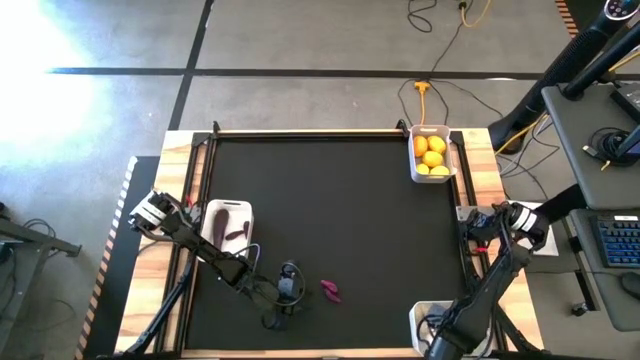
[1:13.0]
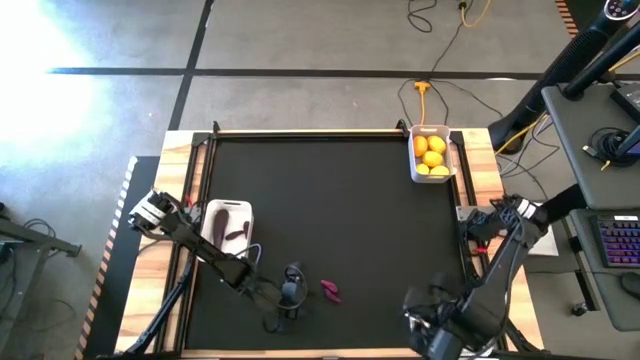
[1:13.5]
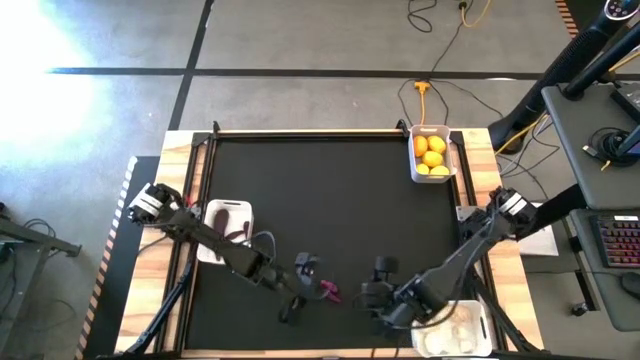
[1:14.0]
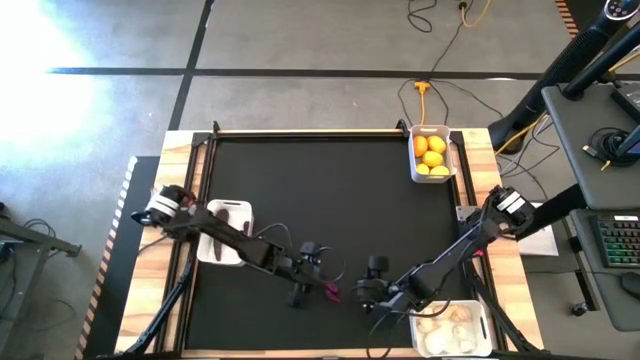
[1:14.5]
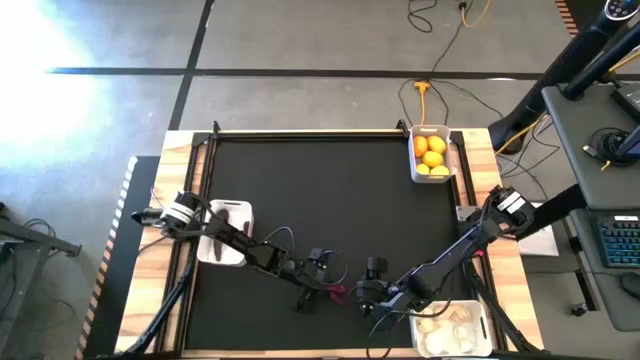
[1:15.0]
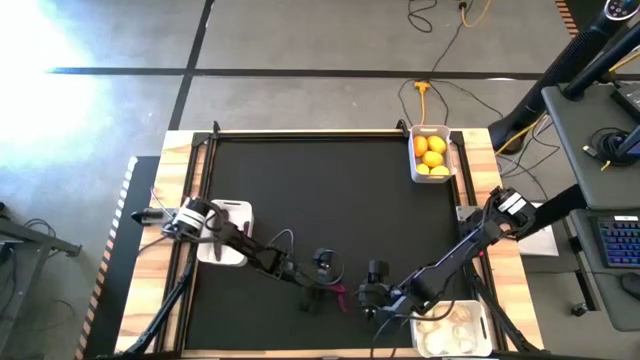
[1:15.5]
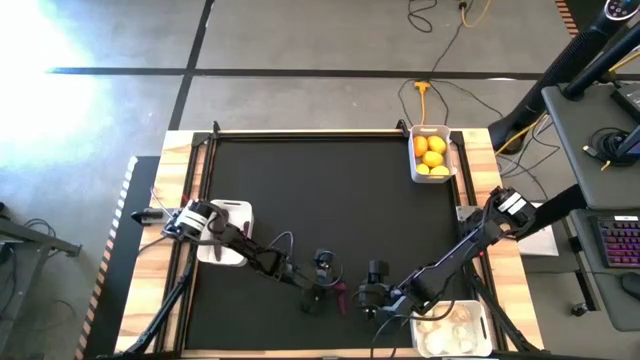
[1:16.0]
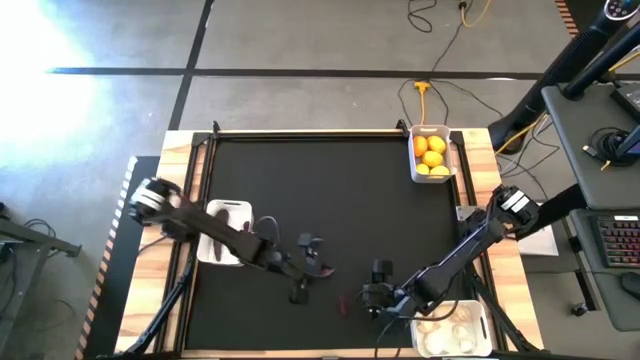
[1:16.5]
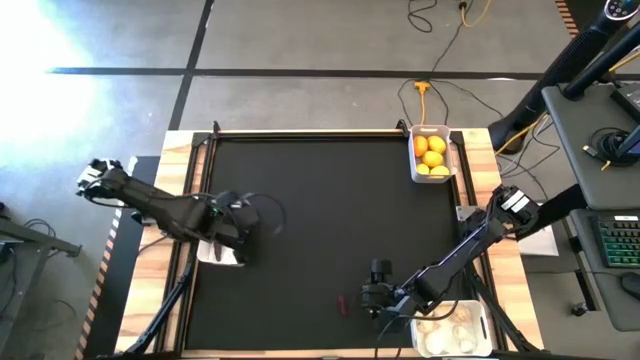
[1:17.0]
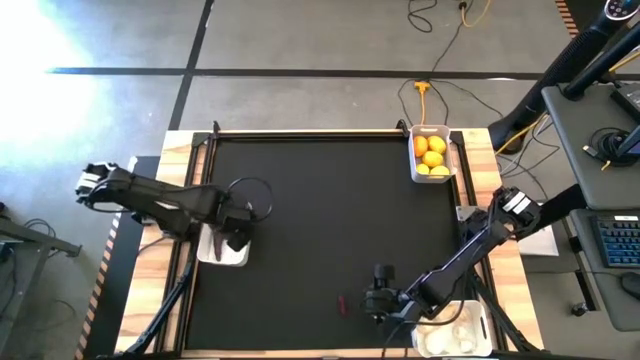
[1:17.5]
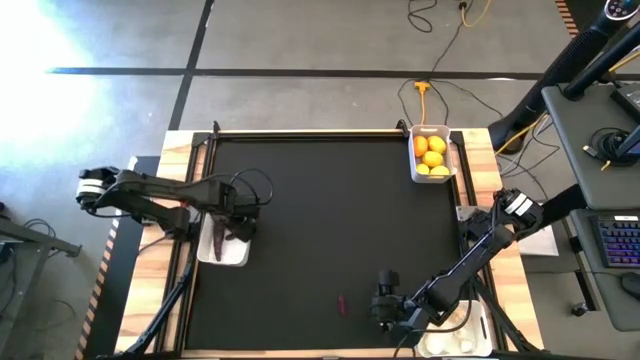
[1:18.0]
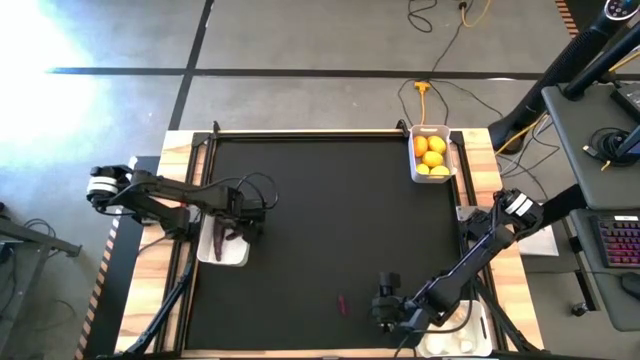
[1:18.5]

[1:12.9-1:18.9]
Task: Sort produce into baskets
Put the eggplant into the top white bin

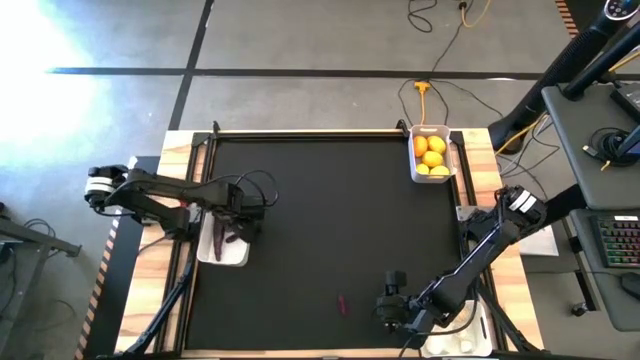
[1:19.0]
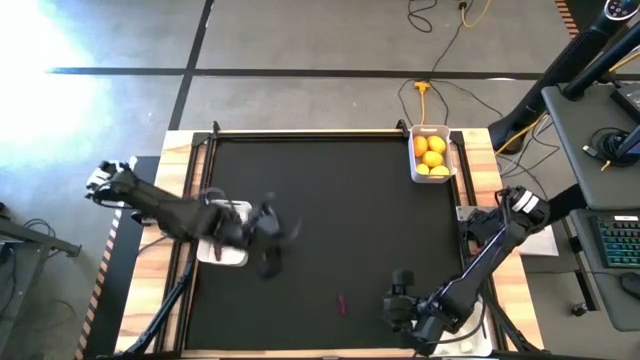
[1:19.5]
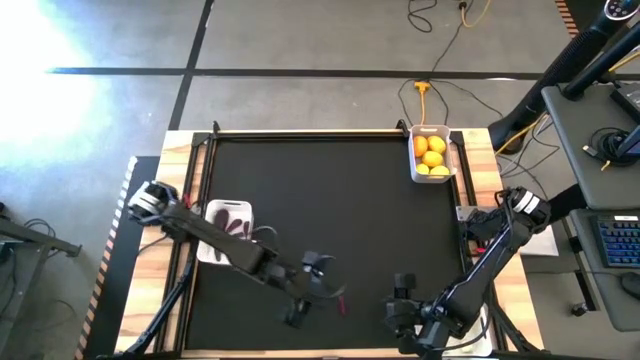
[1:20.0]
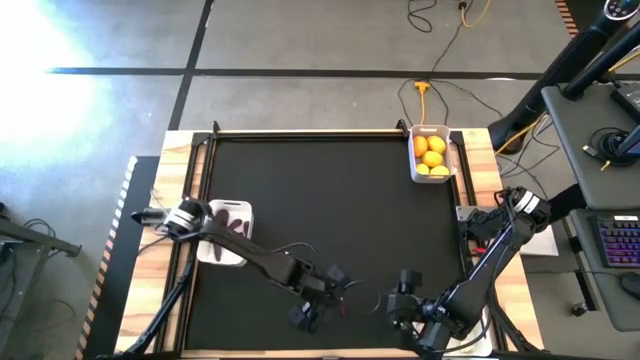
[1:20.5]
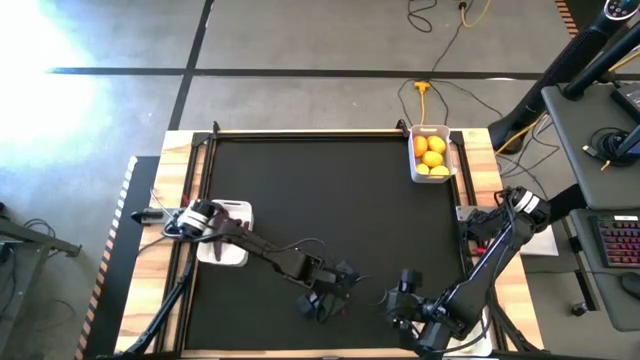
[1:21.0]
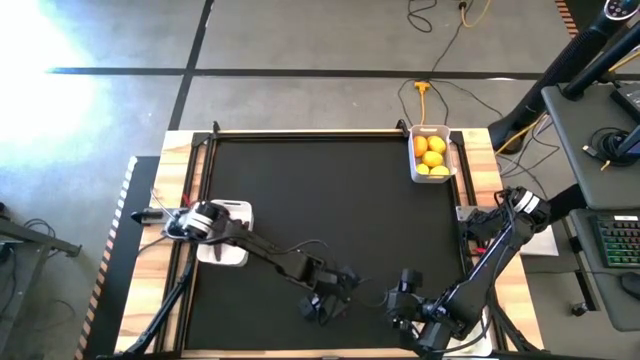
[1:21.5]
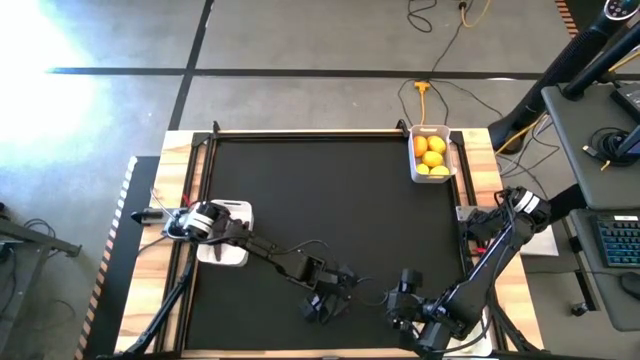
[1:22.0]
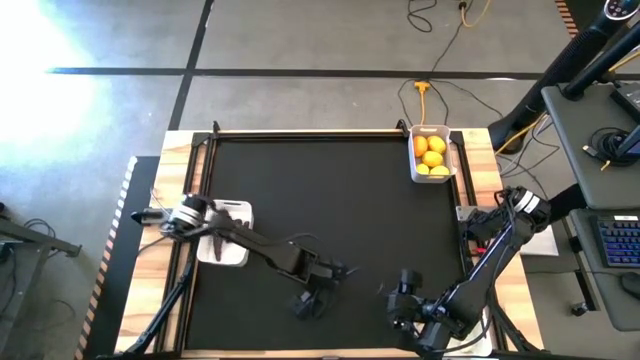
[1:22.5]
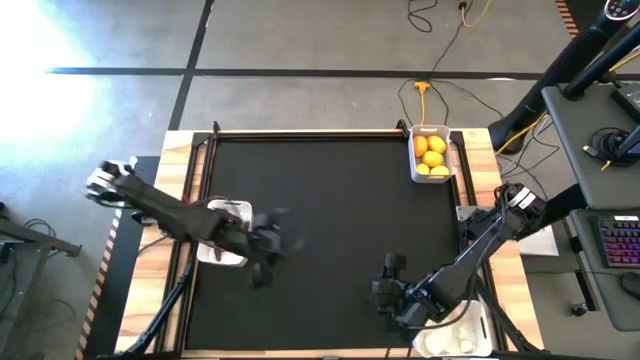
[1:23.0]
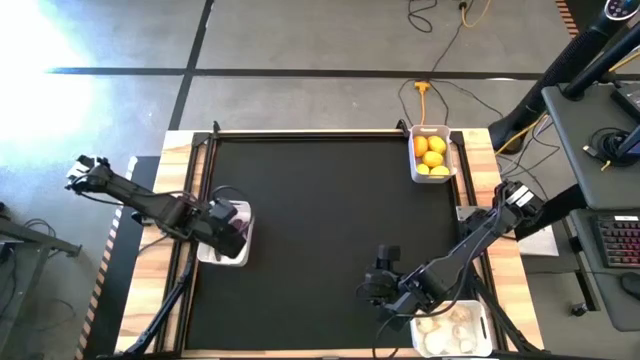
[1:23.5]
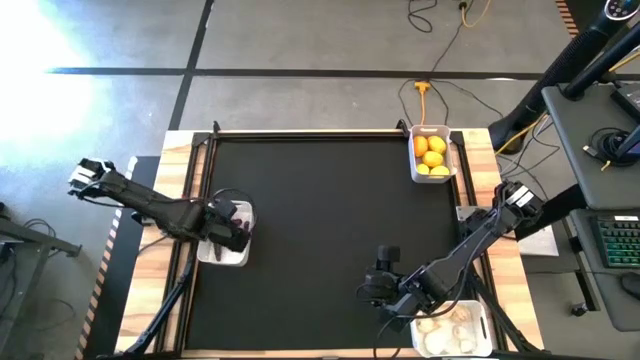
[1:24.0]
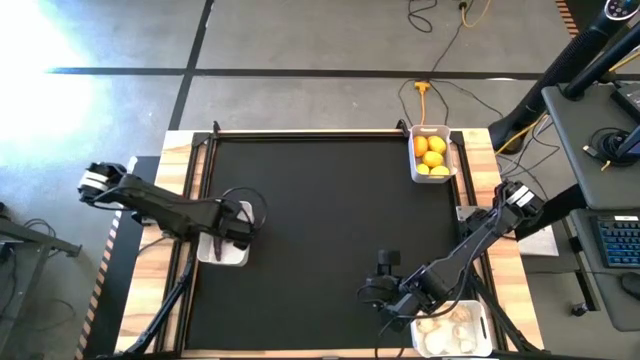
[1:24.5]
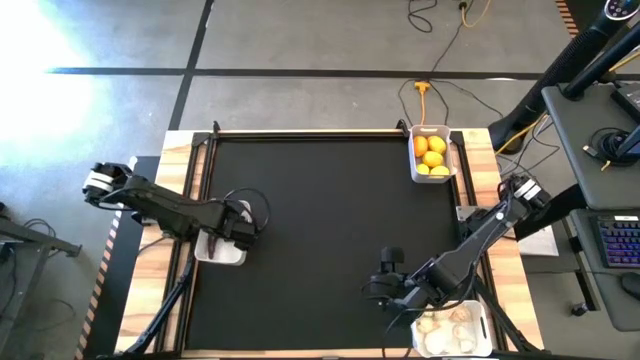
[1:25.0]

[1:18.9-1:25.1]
Put the eggplant into the top white bin

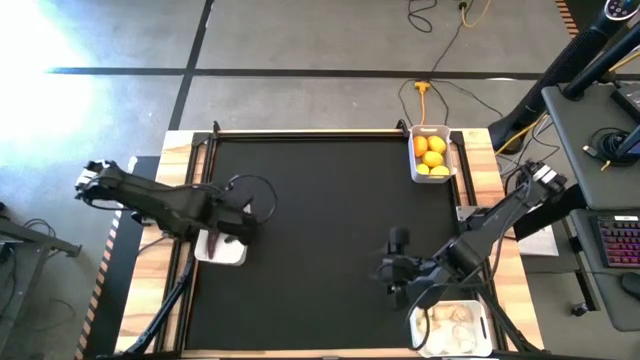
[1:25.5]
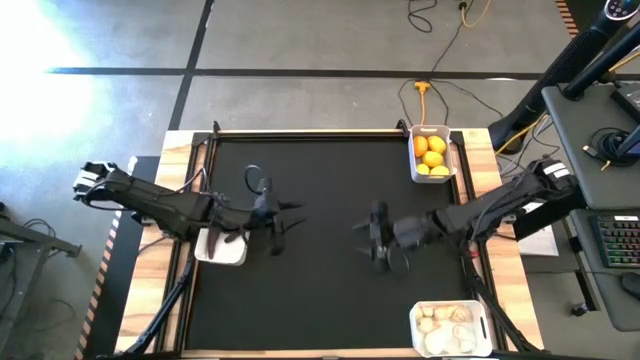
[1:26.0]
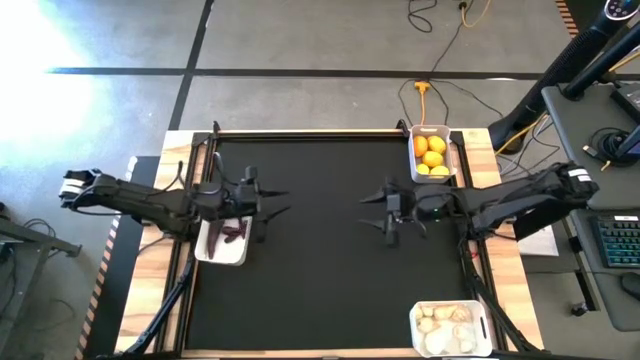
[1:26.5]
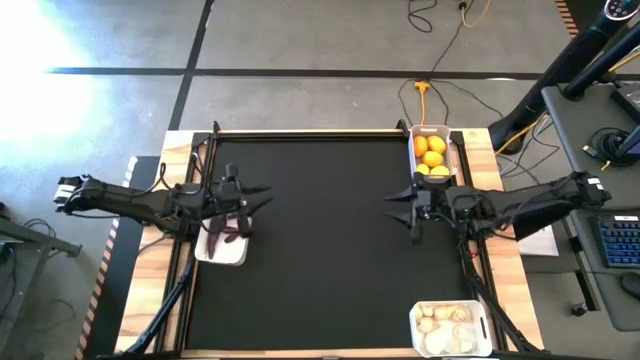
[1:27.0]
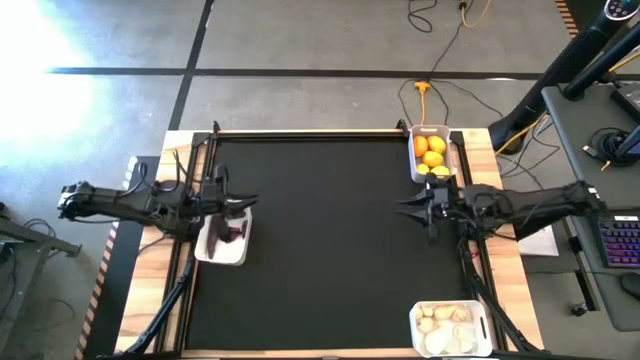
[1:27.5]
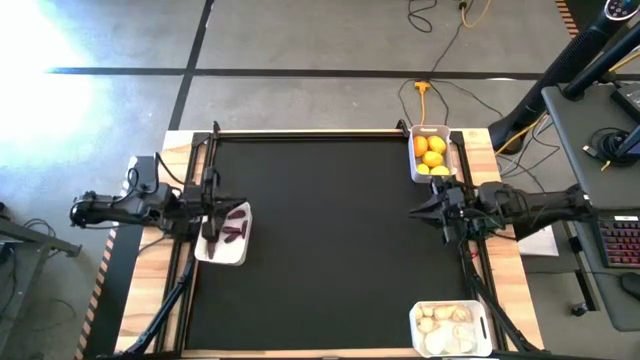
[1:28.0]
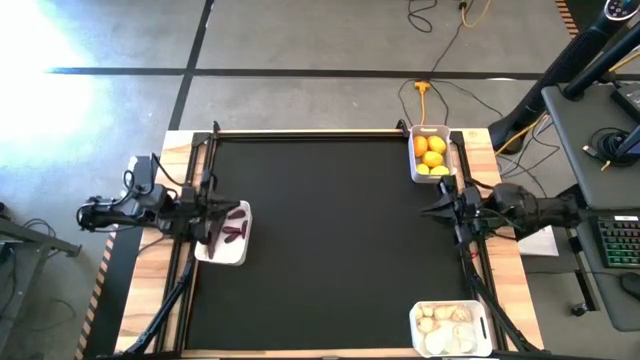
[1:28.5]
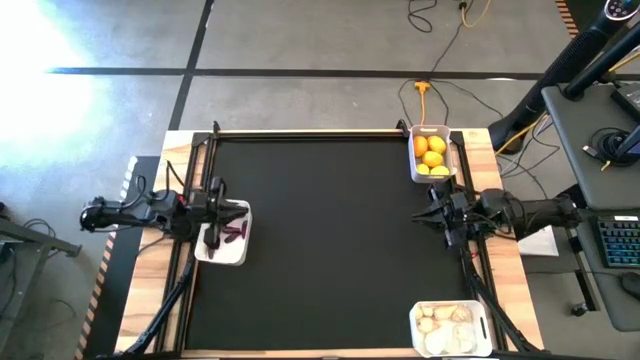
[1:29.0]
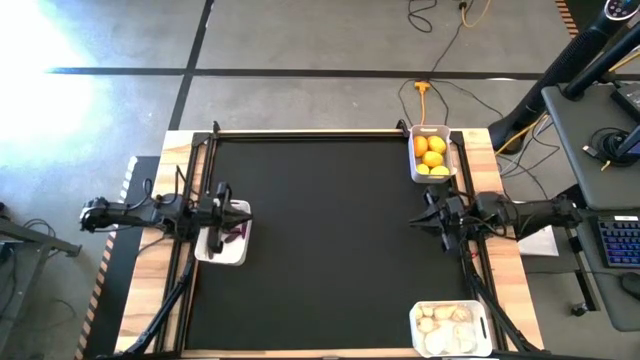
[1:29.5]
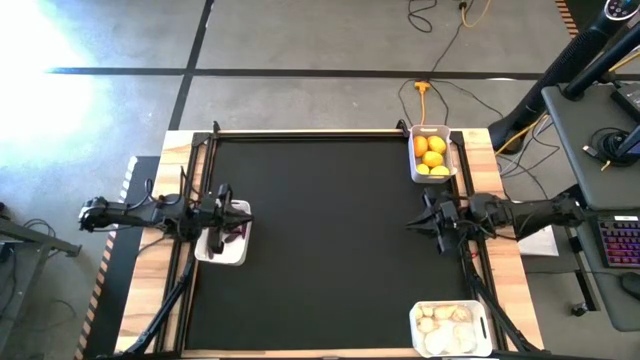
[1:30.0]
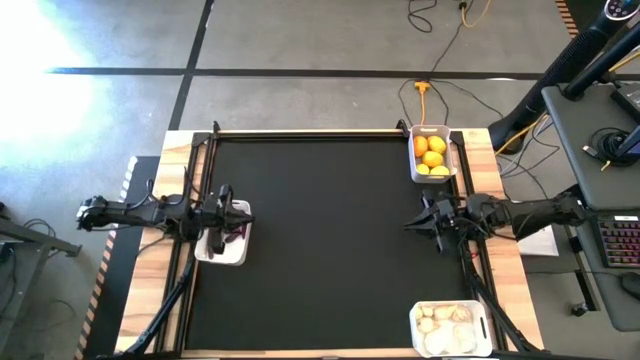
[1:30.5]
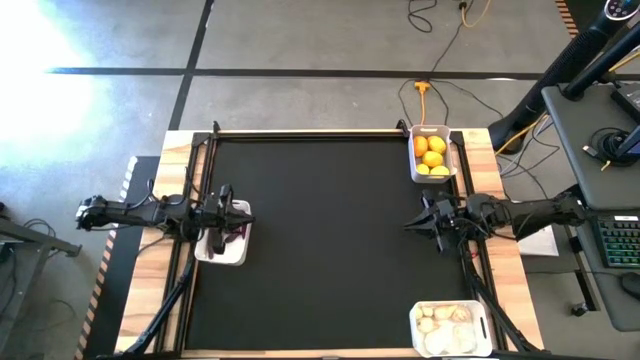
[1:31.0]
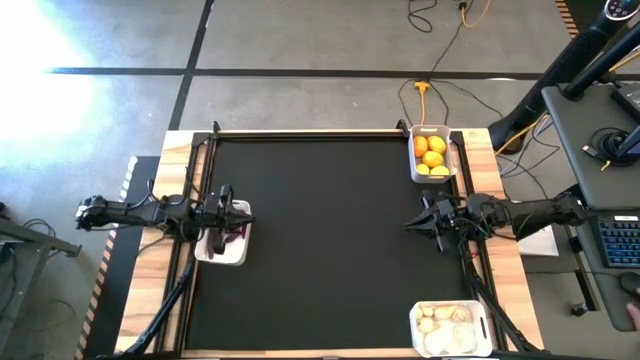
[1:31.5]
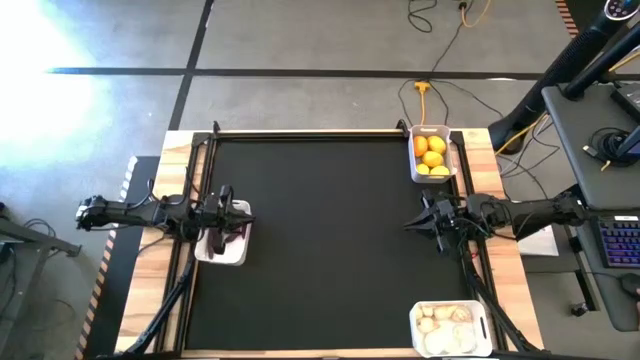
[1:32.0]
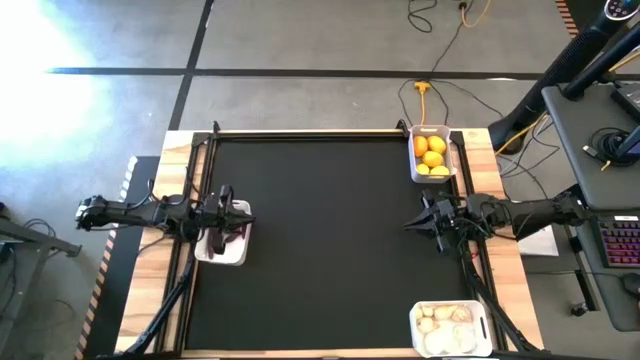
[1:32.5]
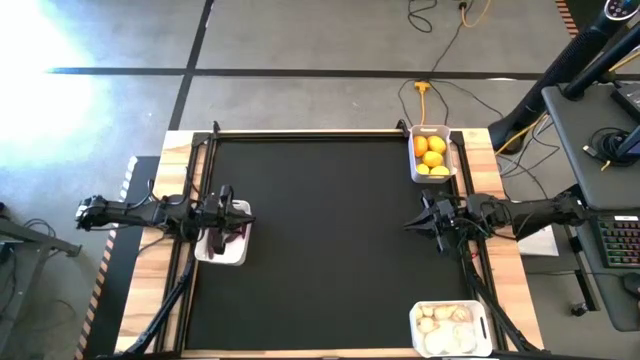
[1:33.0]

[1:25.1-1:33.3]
Return to Home Position

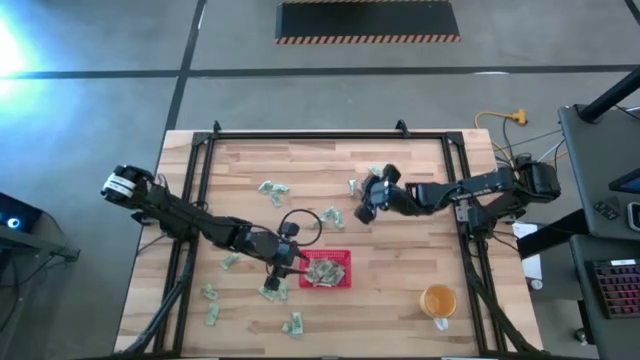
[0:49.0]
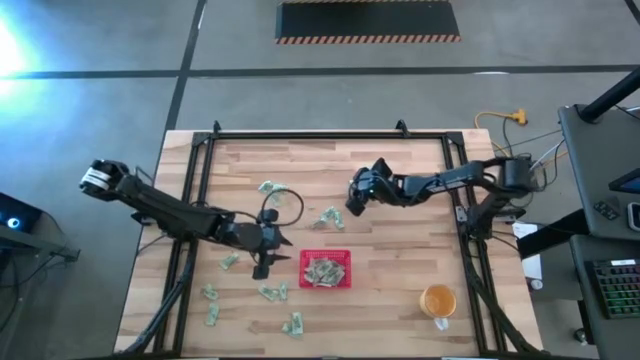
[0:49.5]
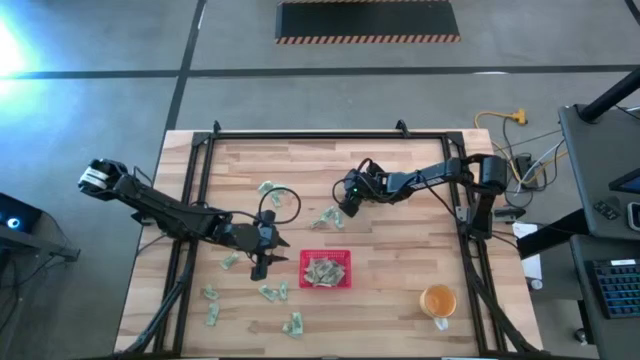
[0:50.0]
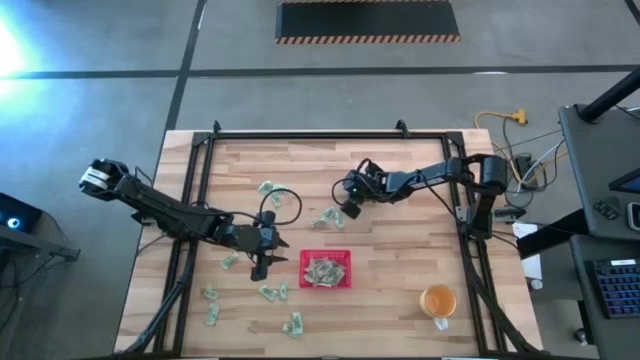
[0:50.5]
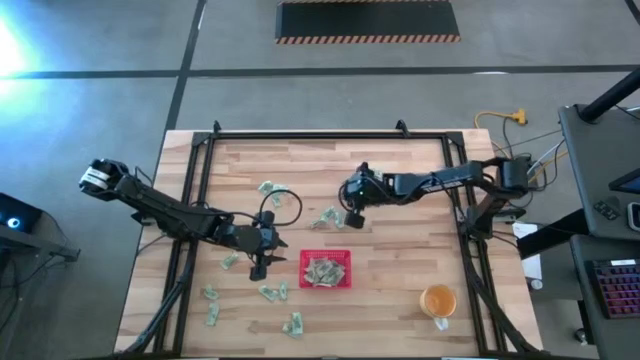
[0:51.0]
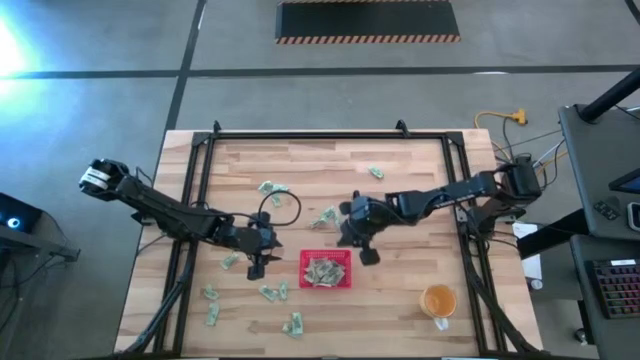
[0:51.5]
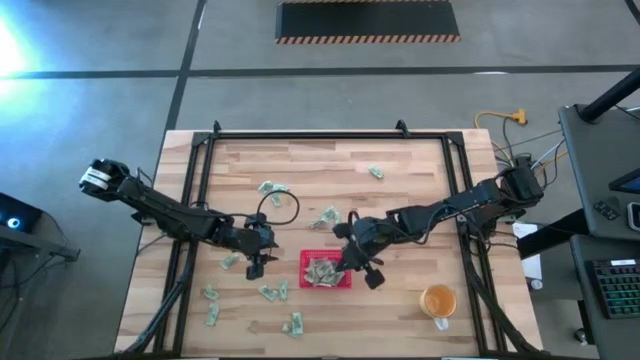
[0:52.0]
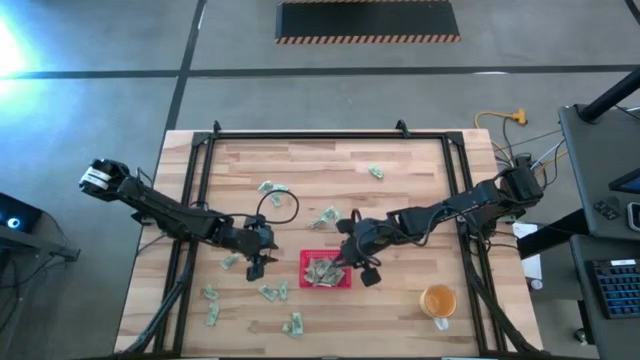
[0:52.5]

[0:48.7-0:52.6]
Task: Pick and place Stevia / Truvia into bins
Put the white stevia packet into the red bin
